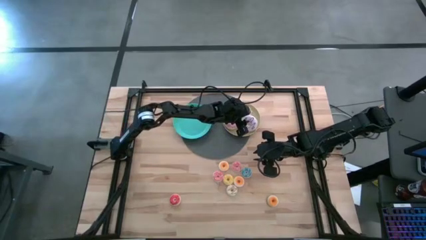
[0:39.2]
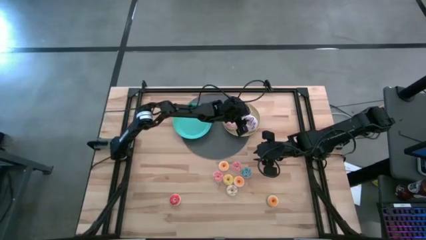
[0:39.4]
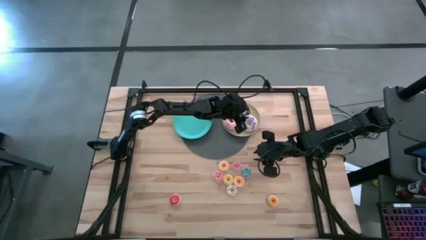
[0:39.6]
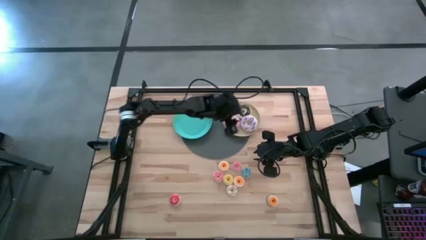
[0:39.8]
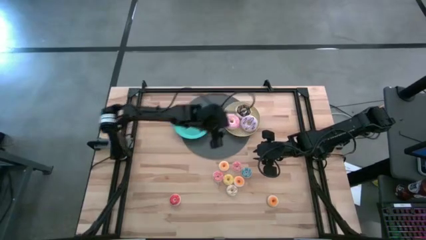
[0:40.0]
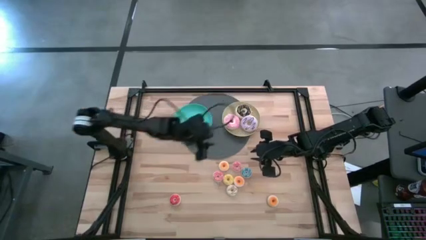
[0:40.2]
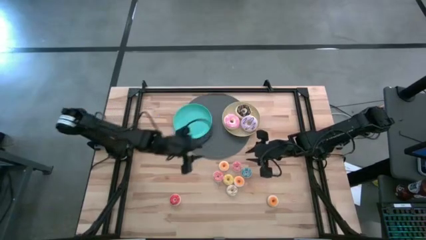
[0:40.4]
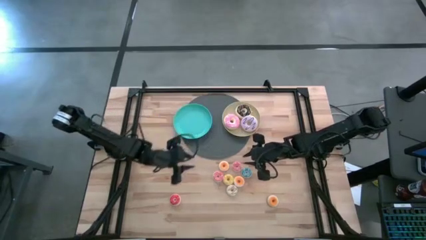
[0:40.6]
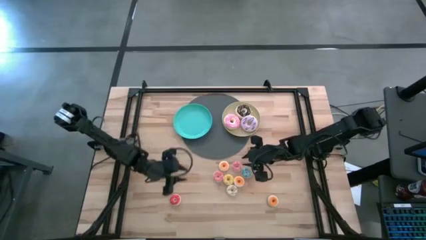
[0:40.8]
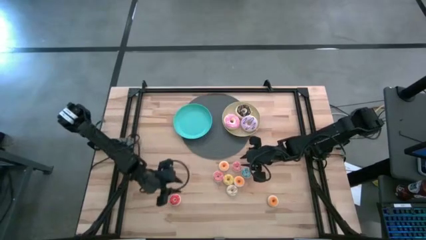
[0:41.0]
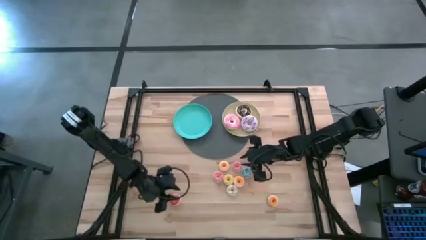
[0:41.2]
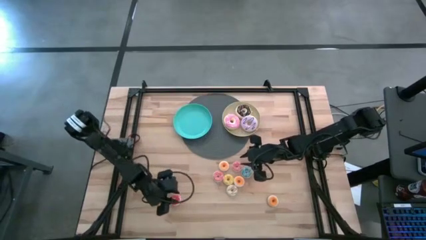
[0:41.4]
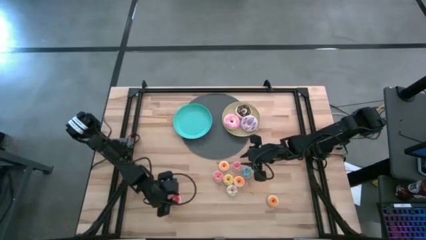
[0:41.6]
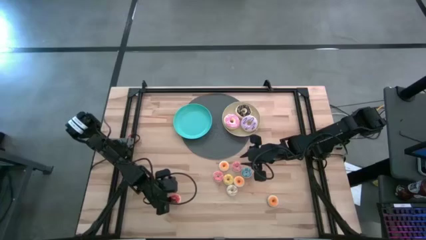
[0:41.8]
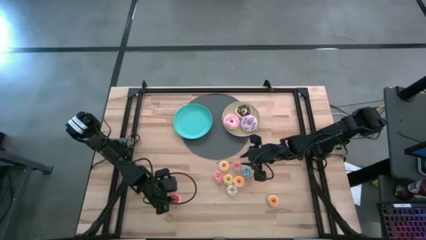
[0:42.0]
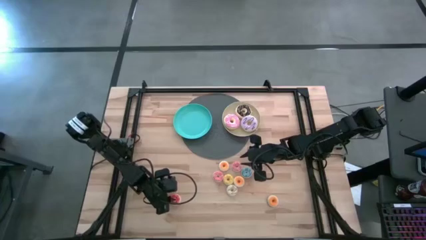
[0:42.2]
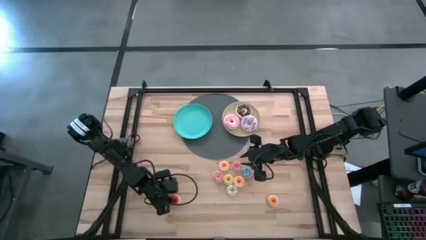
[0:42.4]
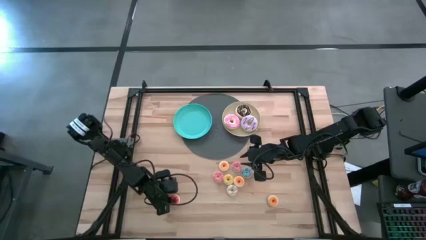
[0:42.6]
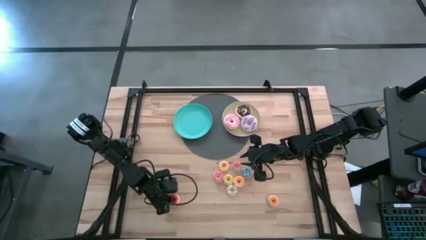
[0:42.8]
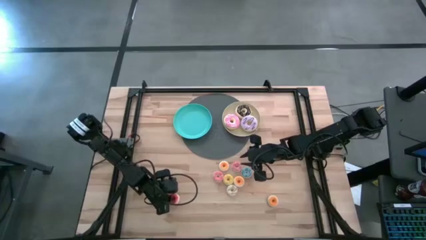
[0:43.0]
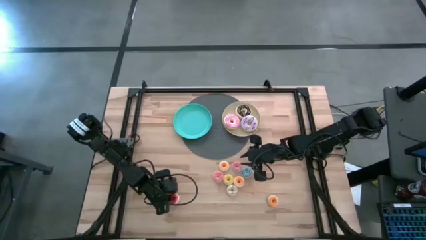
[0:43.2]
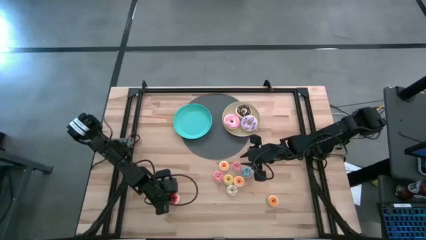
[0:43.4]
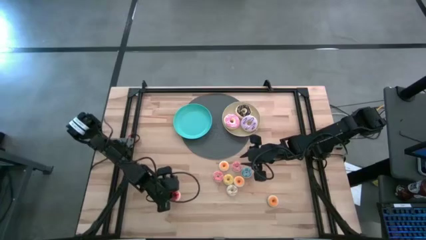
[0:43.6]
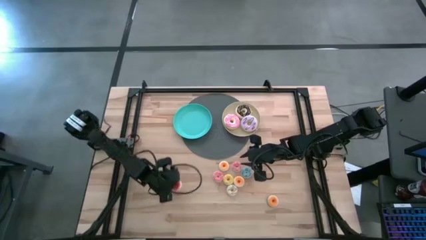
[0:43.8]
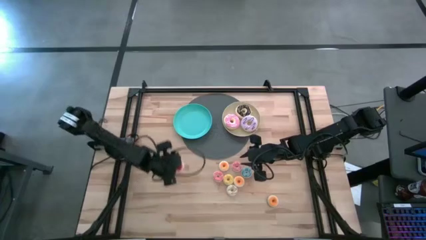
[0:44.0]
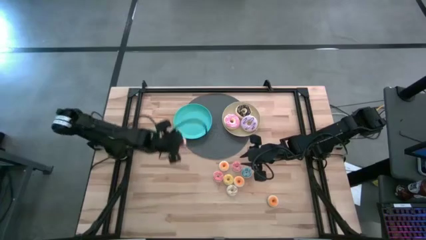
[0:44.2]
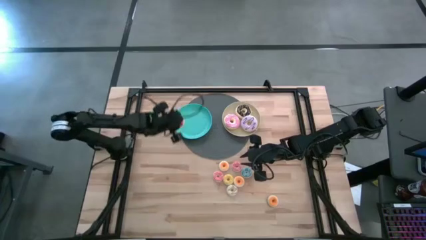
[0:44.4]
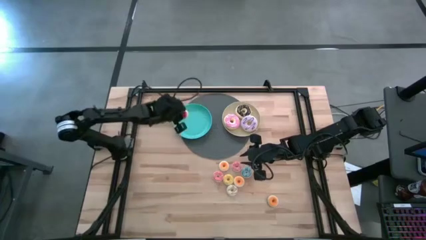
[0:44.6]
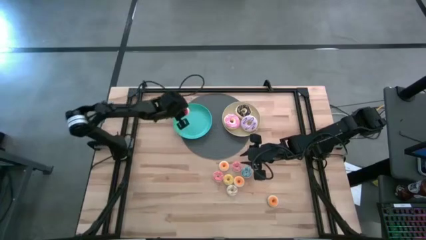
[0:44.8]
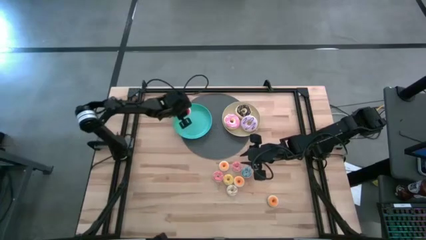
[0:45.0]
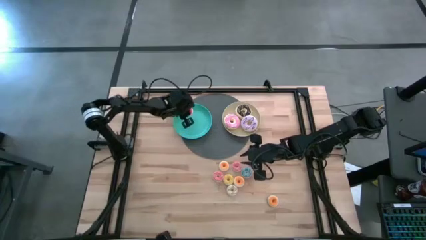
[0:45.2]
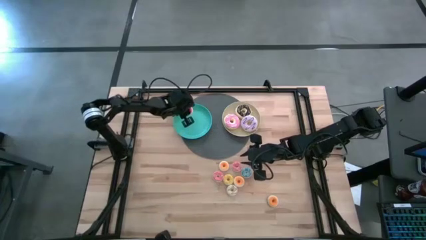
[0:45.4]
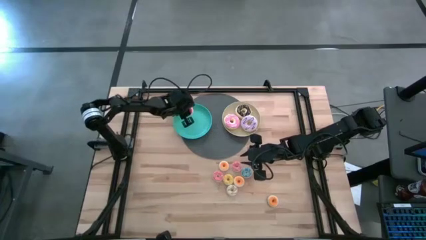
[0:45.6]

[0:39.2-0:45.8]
Task: Pick & Place donuts
Put the small red donut on the green plate

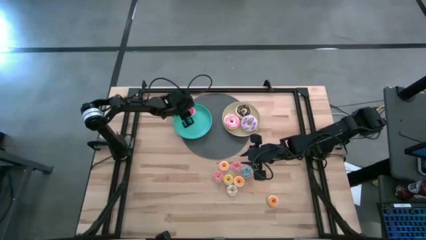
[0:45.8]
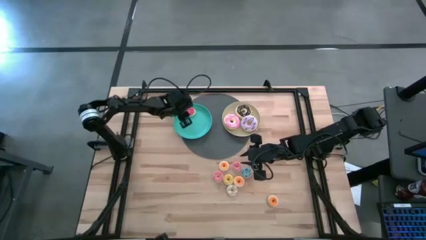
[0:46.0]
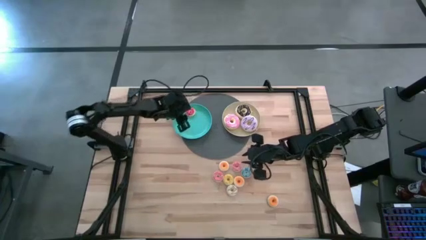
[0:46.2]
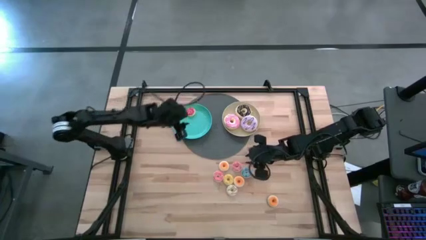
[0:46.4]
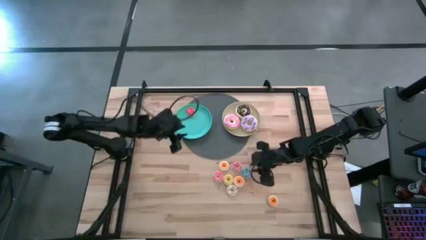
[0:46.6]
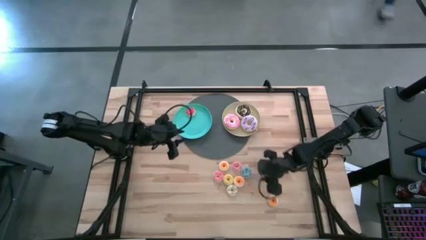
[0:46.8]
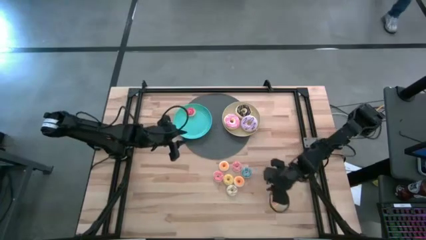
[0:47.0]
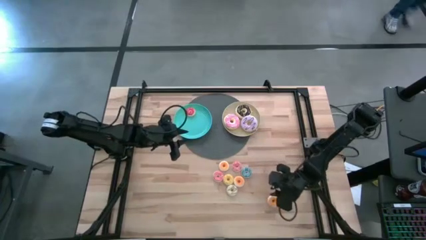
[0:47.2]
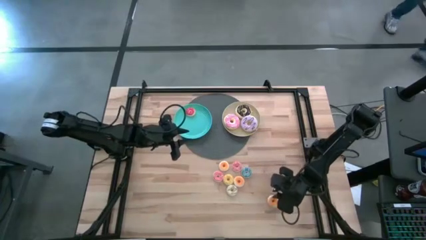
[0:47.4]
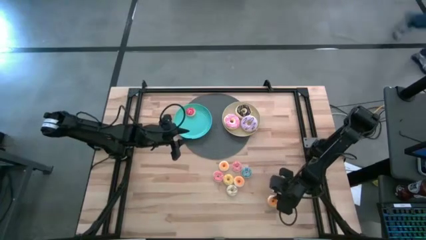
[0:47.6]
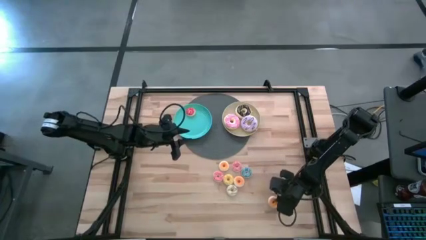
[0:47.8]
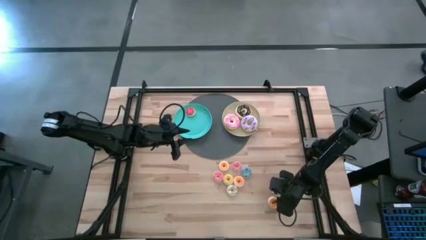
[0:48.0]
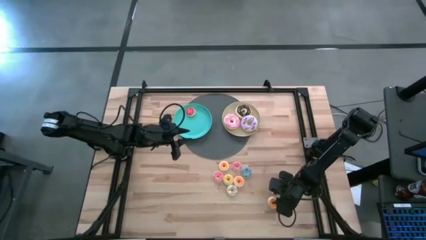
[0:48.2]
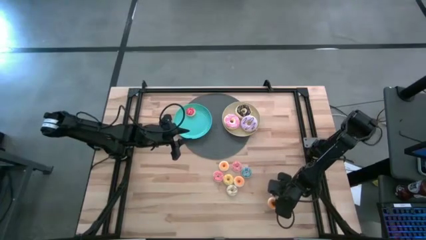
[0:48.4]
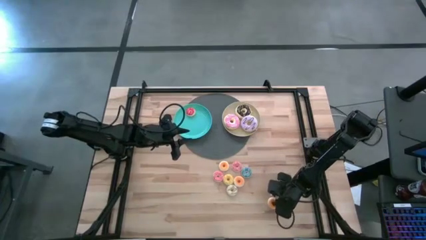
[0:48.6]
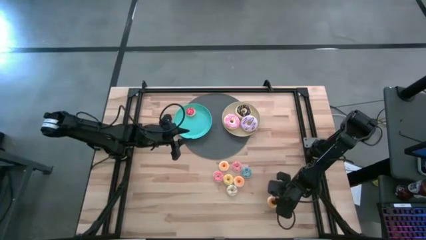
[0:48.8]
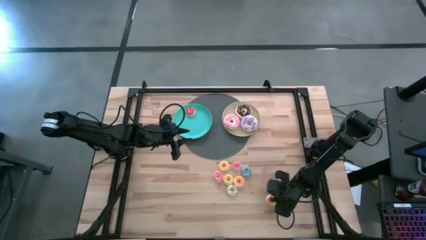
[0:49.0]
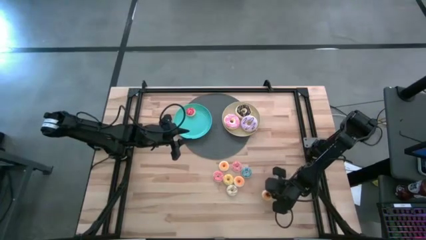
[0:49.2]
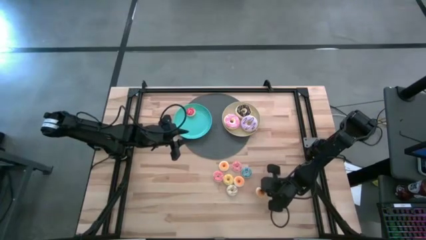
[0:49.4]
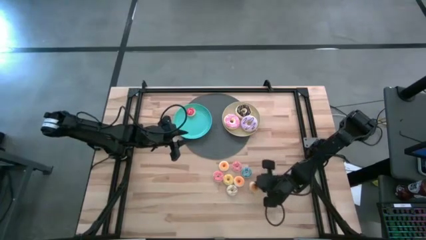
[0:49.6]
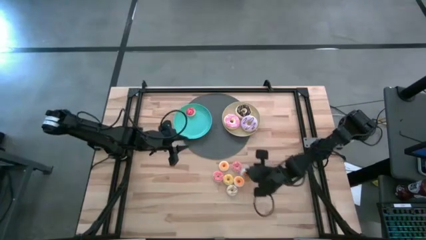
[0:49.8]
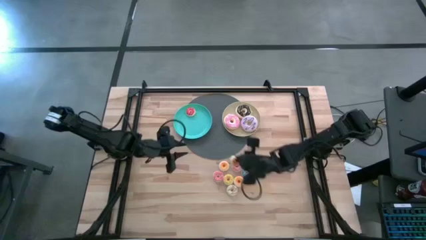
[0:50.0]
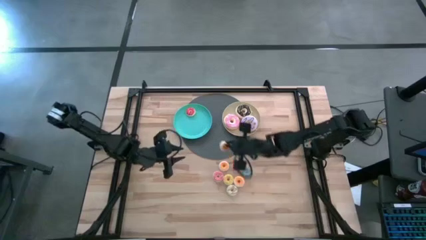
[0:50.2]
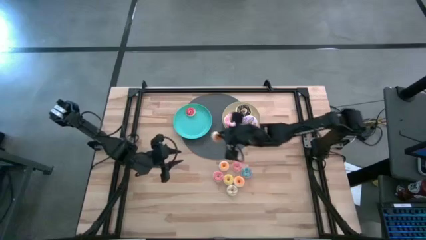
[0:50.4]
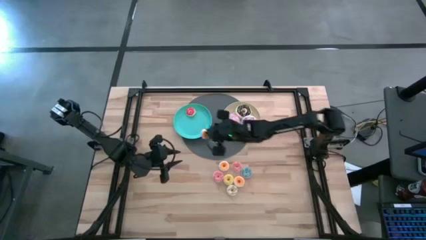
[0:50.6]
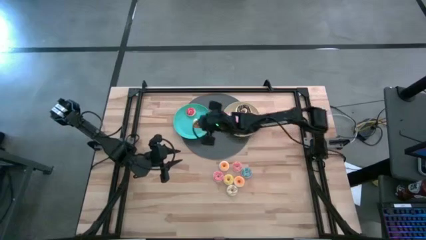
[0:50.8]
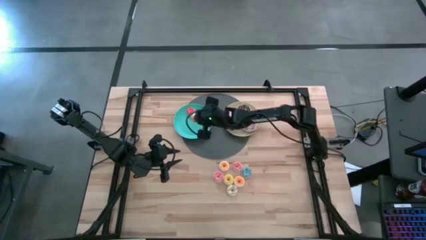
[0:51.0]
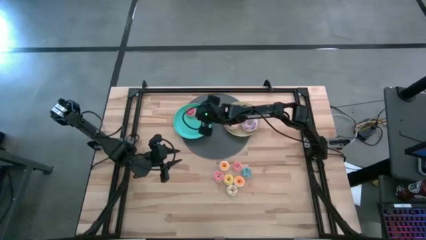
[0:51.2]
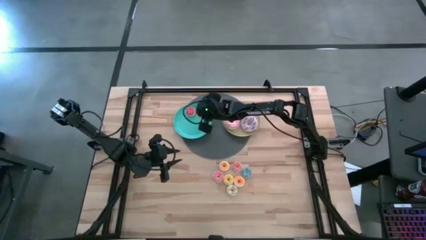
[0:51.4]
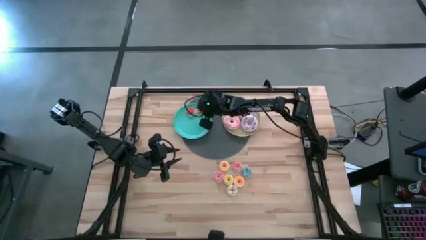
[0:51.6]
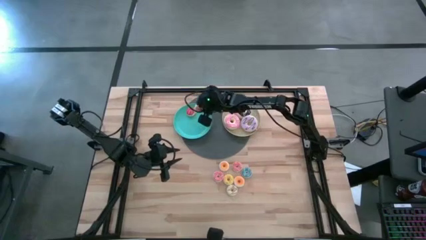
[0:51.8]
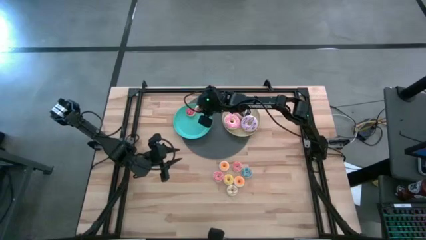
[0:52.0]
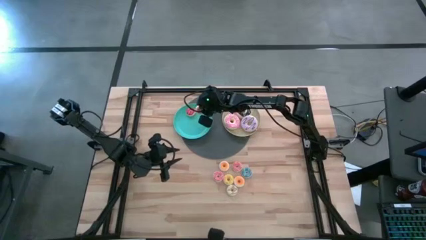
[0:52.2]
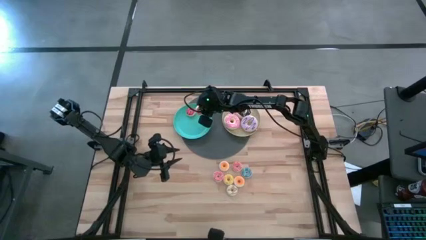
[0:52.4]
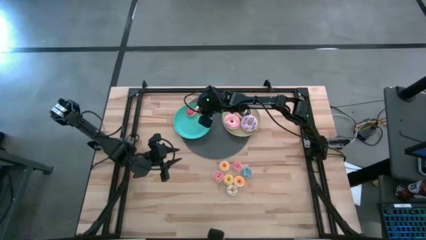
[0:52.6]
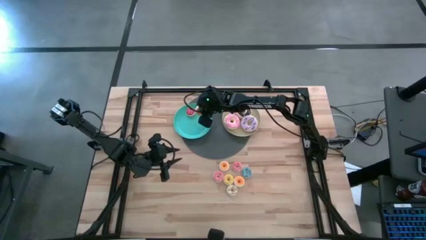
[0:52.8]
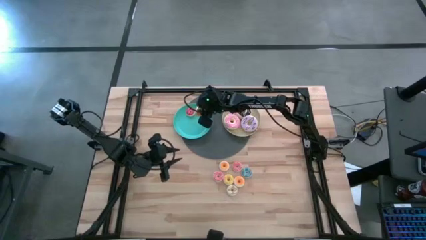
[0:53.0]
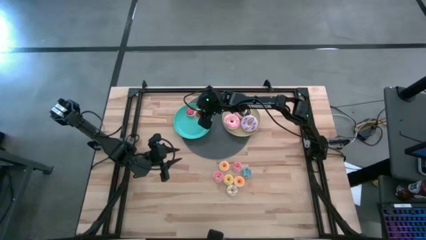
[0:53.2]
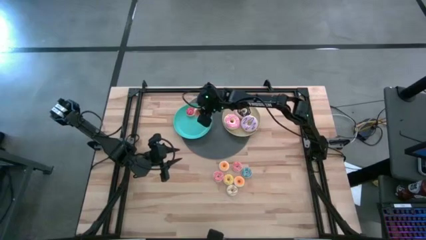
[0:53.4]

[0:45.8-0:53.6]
Put the small bottom orange donut on the green plate

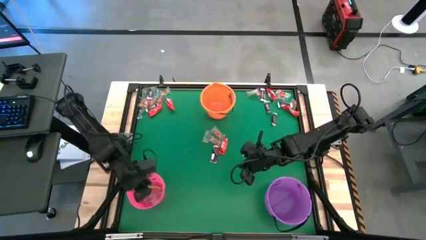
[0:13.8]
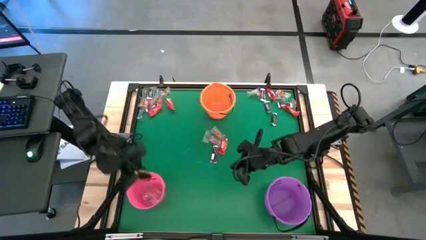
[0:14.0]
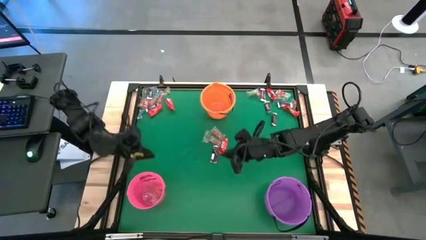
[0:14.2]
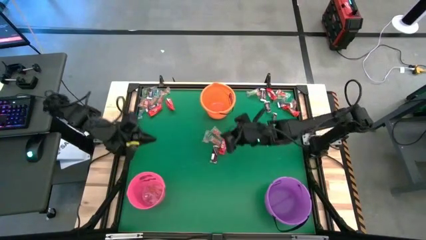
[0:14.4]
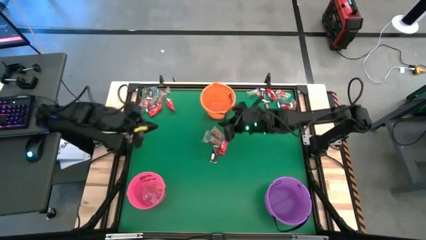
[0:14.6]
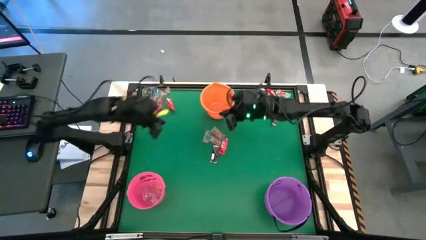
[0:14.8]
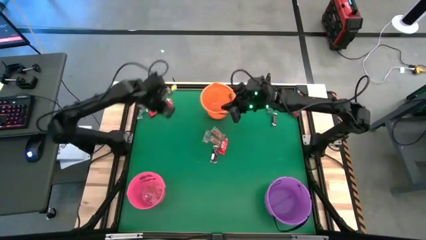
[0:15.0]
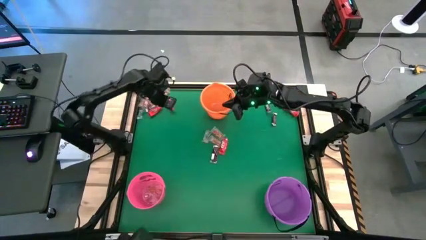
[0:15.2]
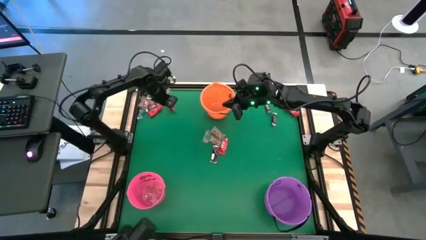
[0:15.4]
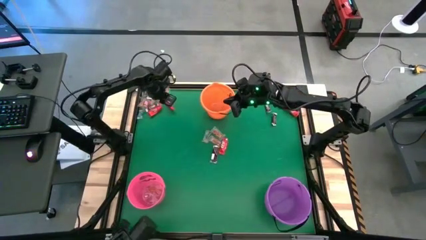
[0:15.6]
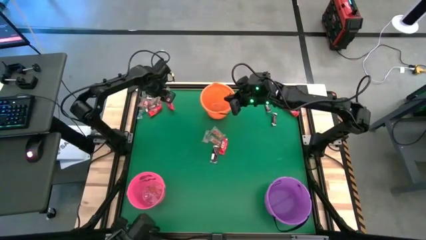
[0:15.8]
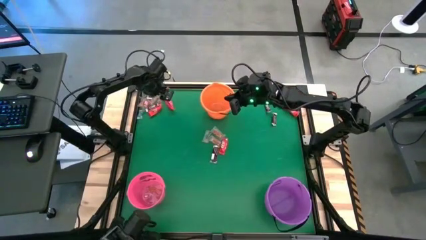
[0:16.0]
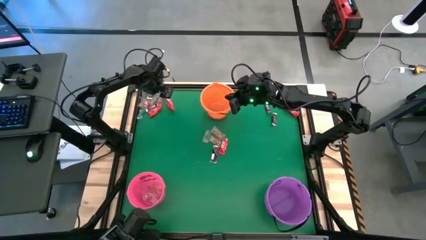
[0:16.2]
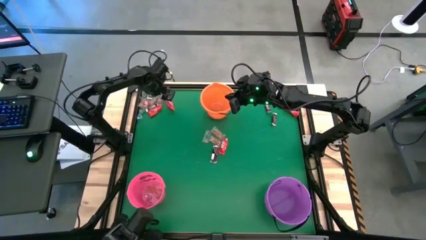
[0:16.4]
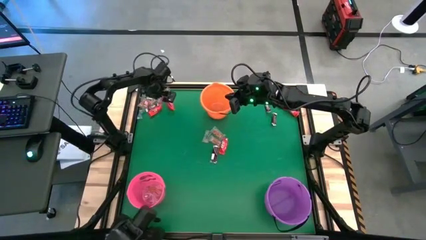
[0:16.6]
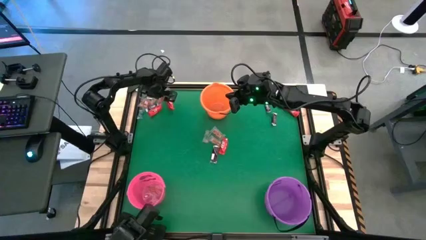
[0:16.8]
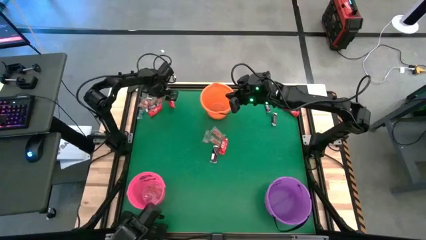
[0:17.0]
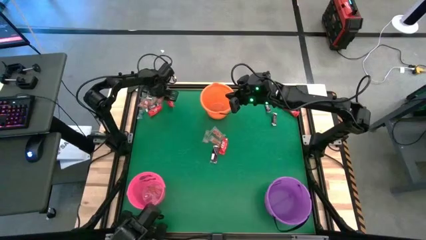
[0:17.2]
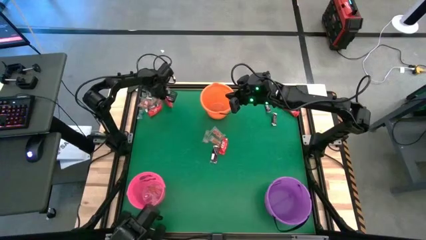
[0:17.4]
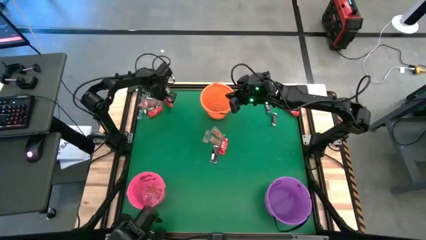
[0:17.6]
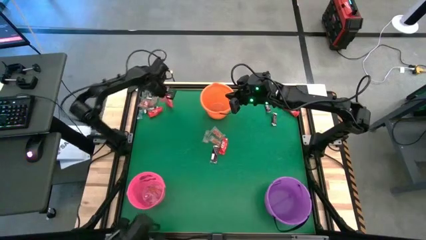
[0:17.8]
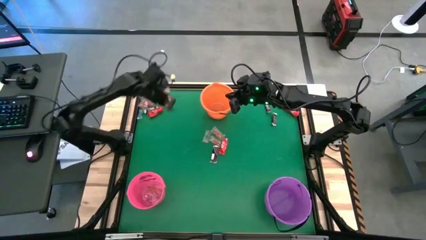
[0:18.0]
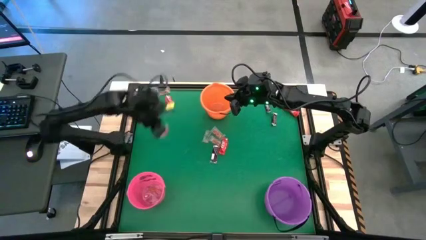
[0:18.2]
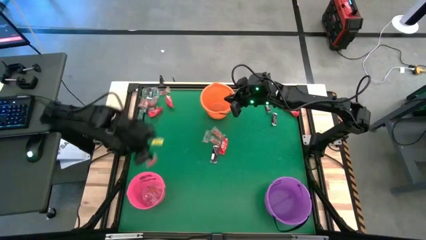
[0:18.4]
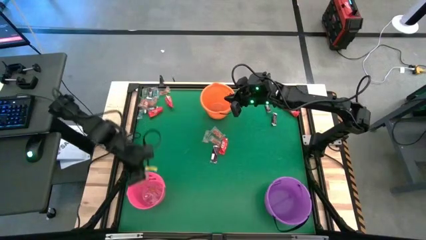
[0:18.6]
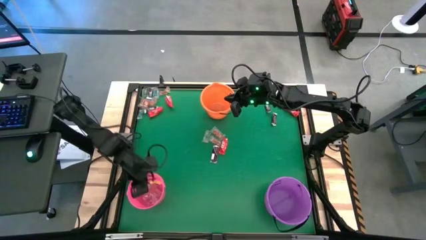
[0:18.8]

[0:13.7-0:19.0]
Task: Sort candy by brand, put in halloween buckets
Put the red gummy pack into the pink bucket
